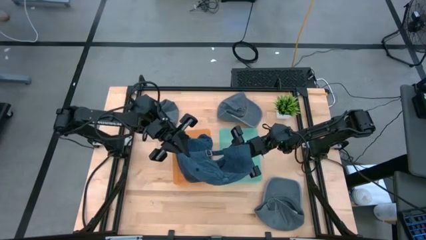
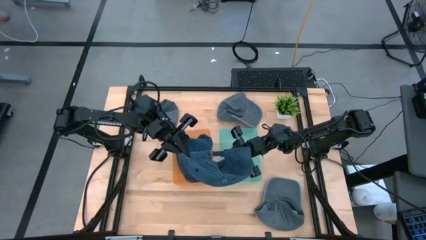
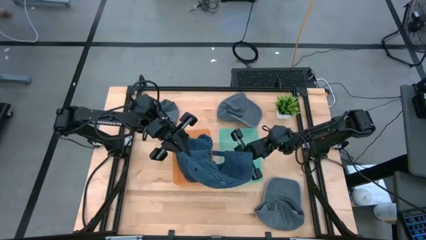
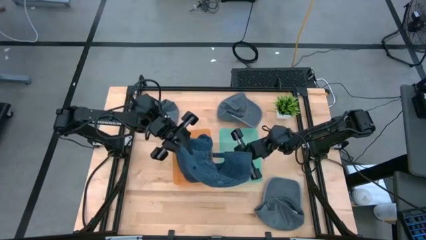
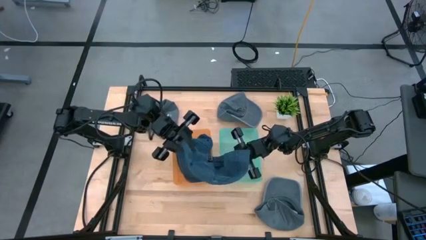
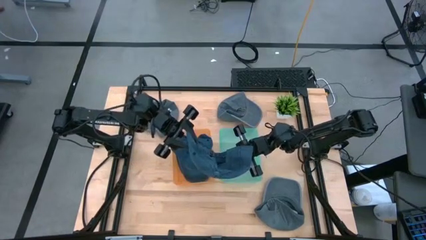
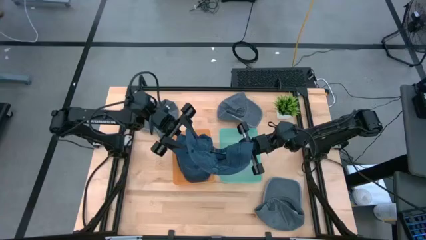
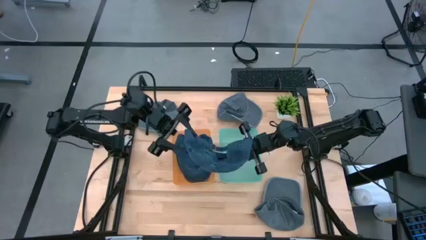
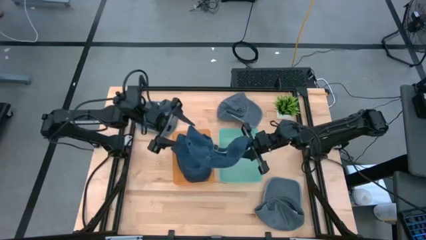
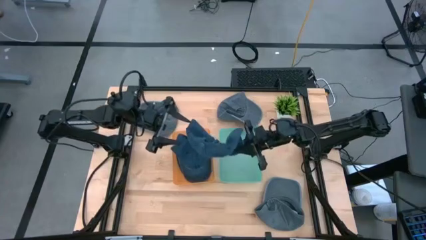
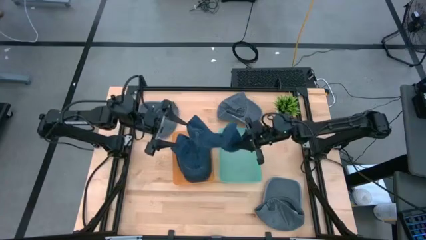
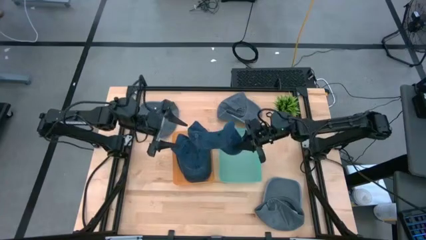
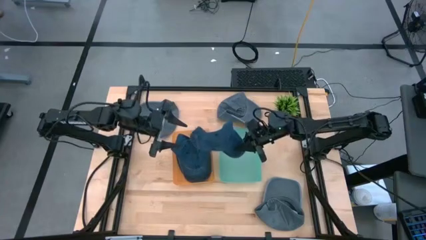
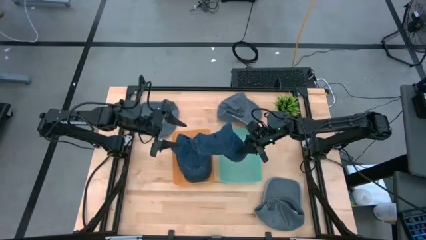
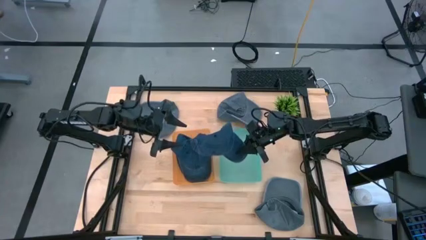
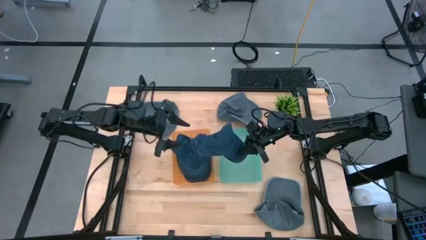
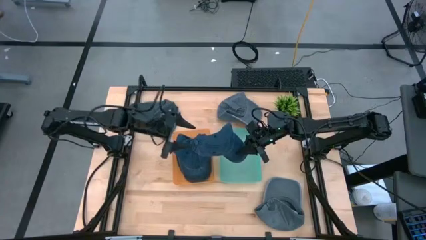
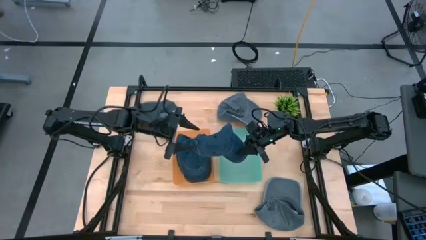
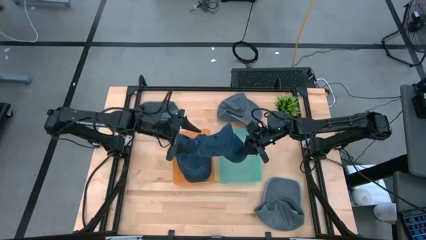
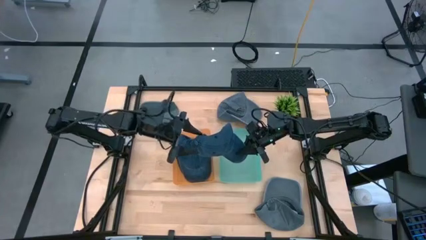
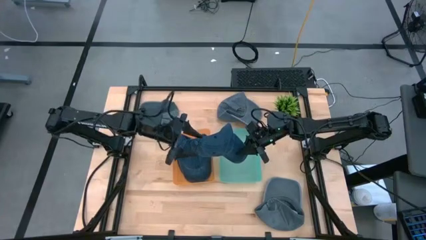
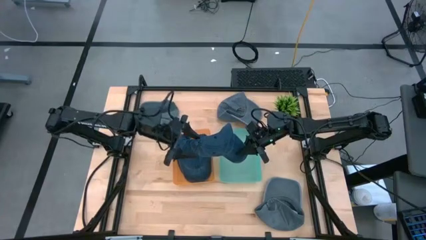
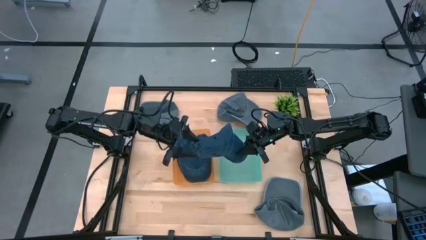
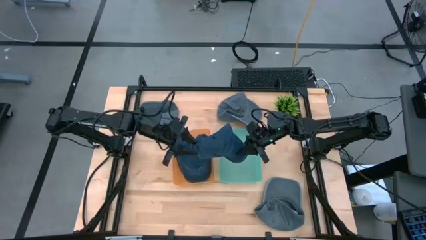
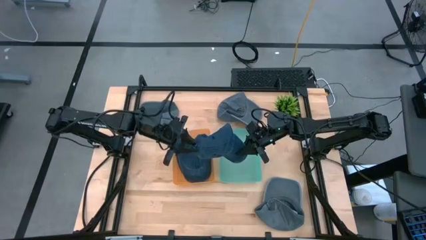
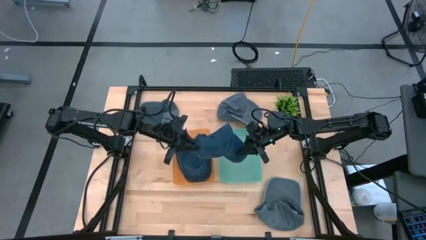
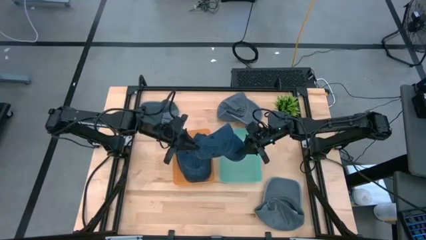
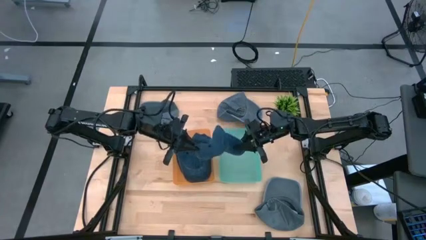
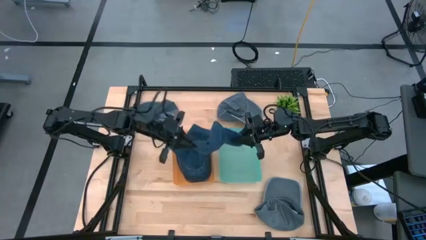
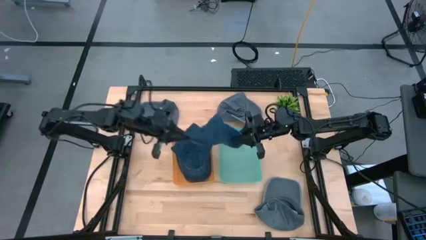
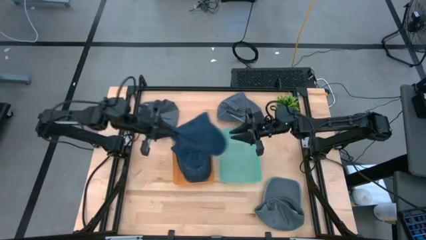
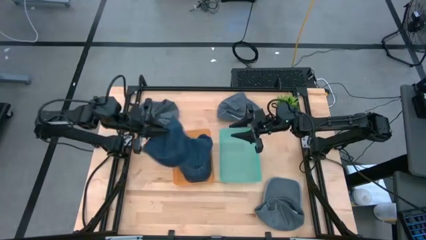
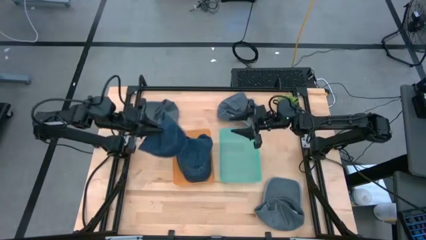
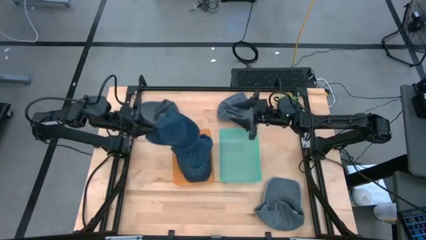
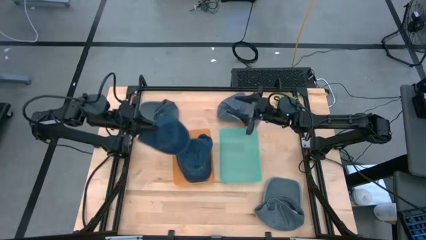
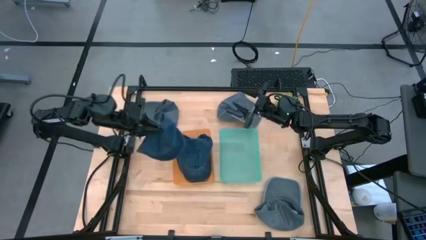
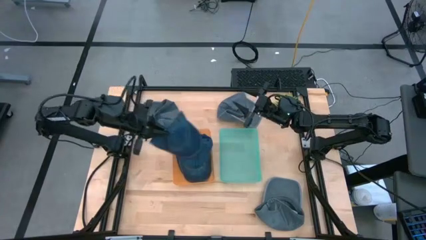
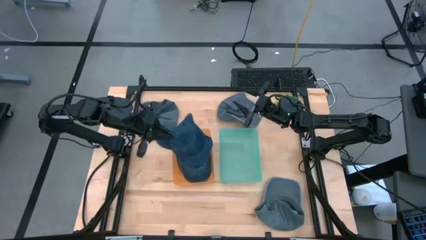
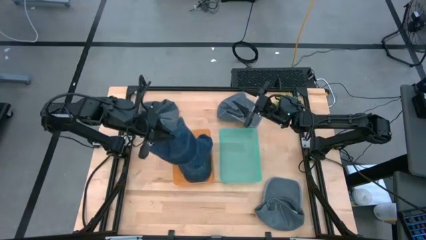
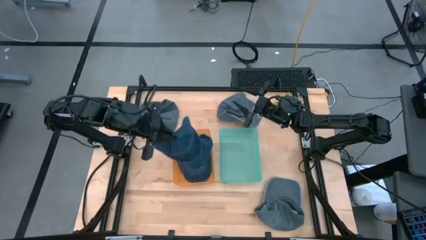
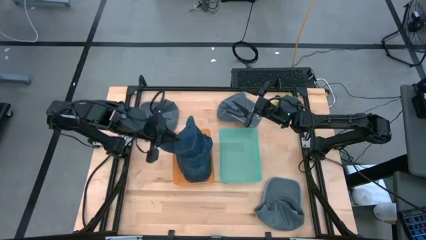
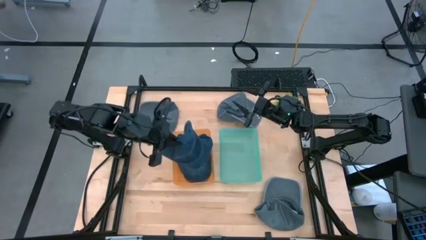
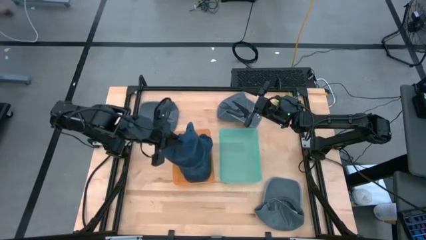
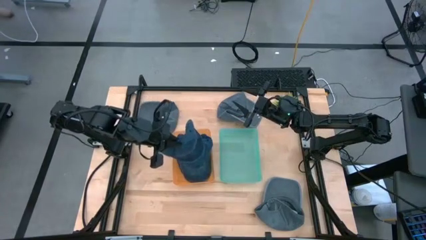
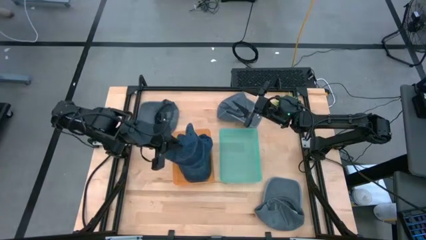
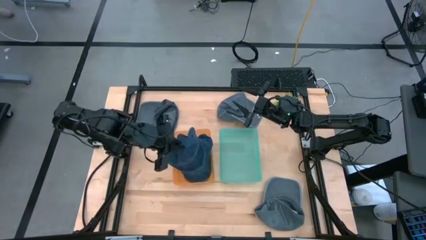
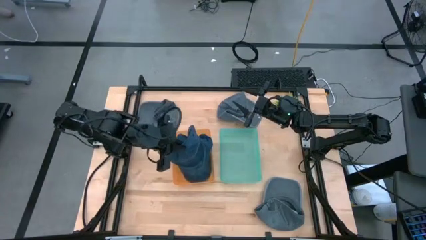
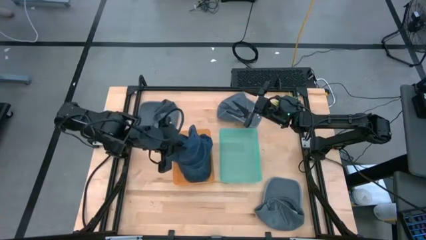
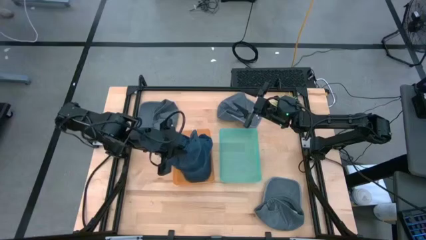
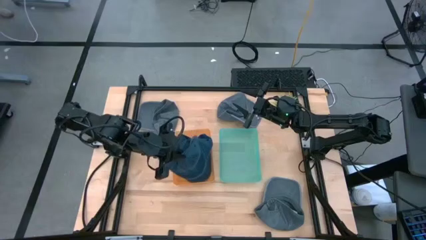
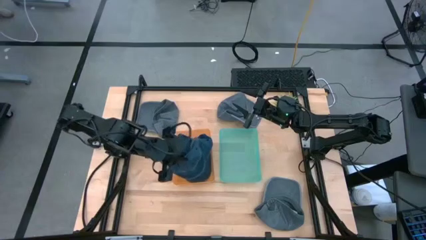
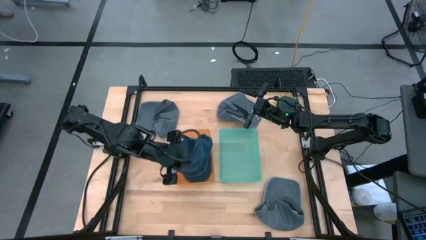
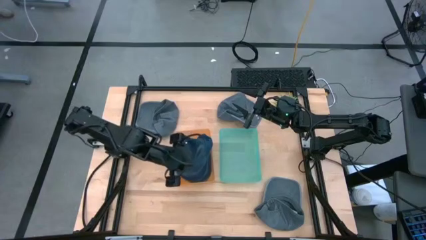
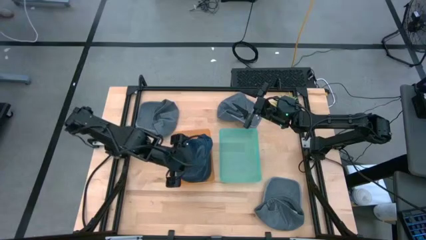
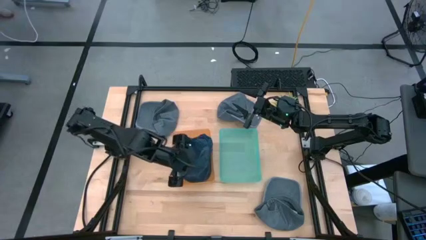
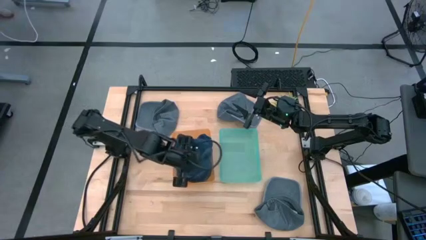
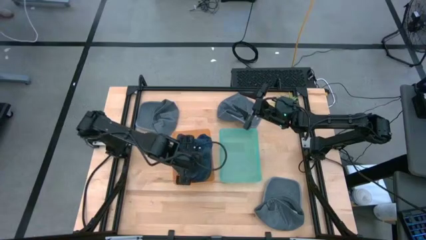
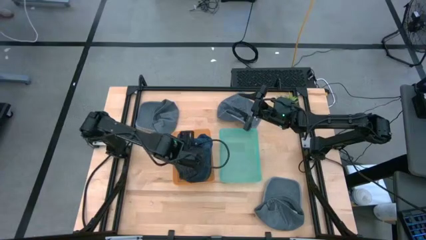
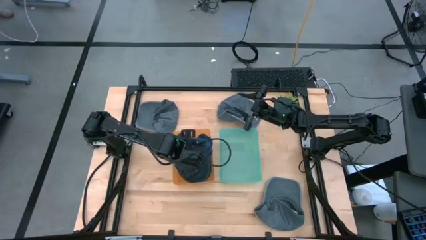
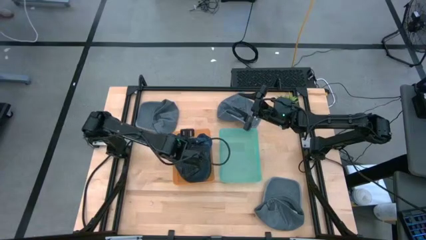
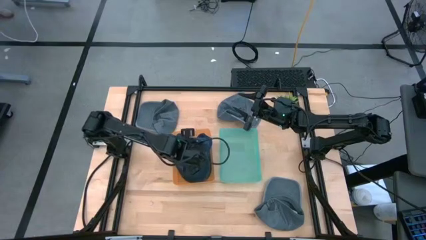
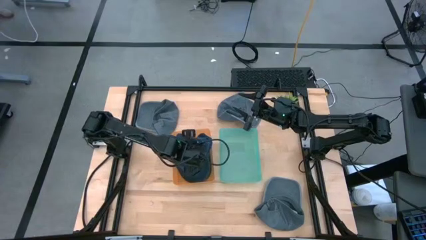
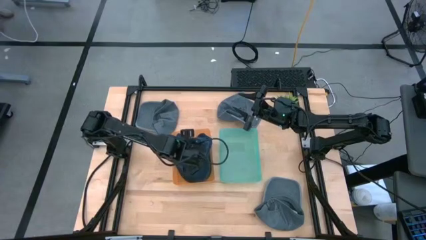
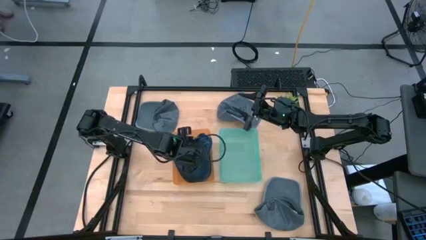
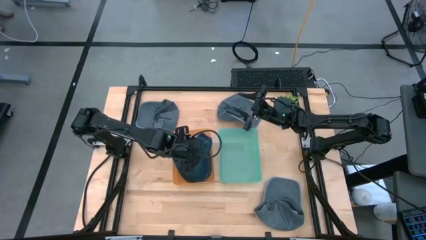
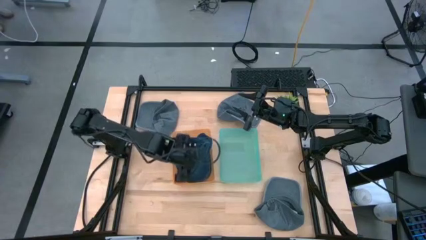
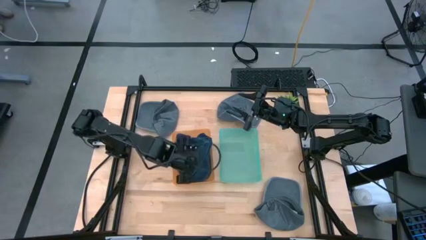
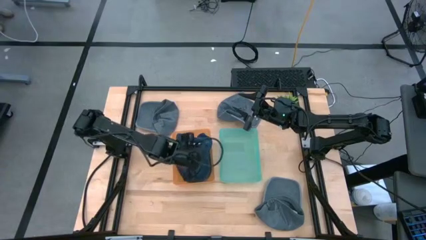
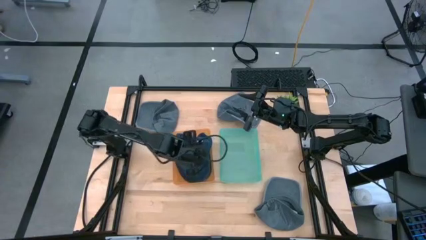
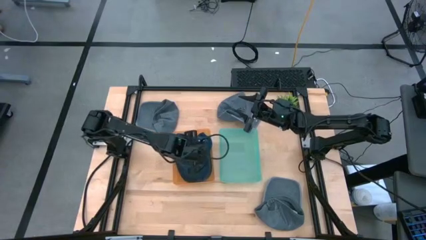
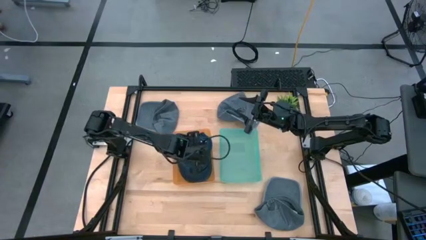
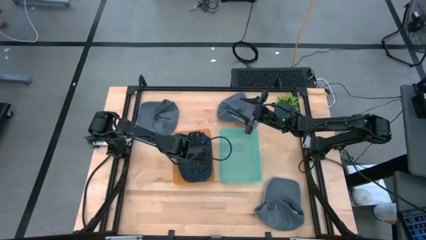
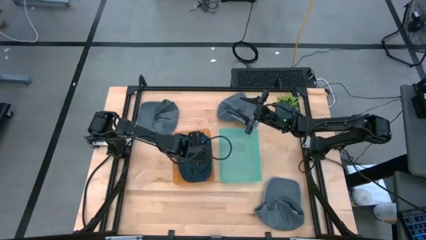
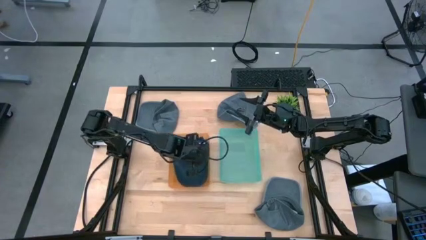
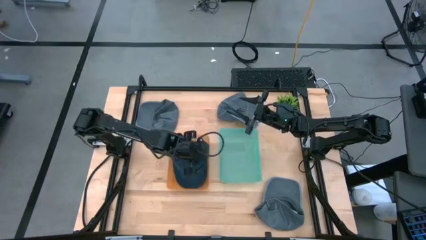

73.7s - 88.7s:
Task: Pick & Place hat
Put the blue cap into the orange bin

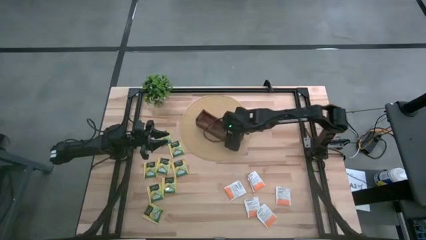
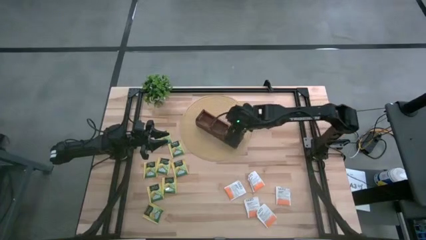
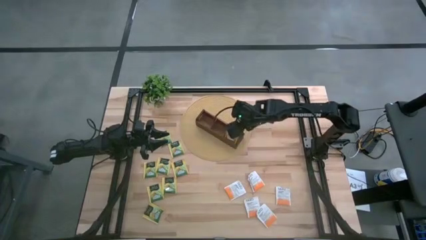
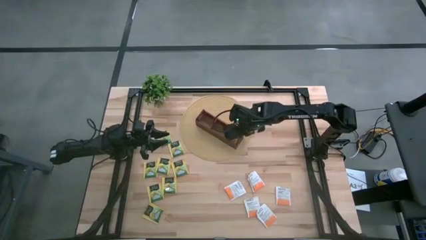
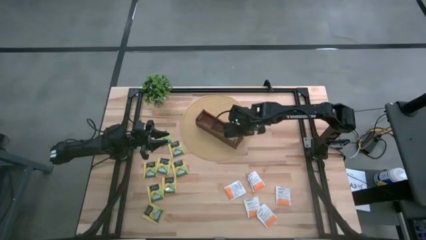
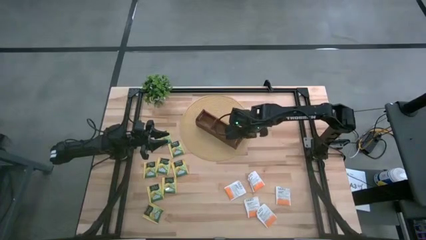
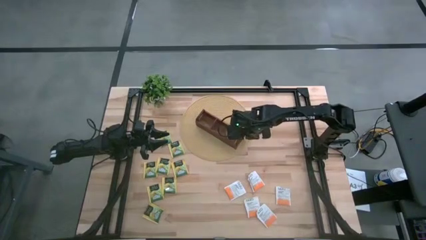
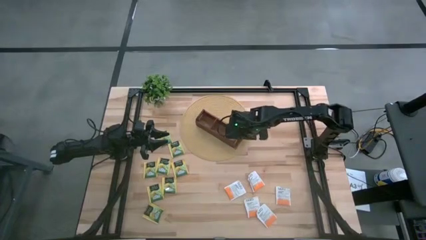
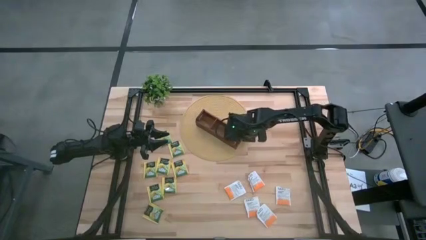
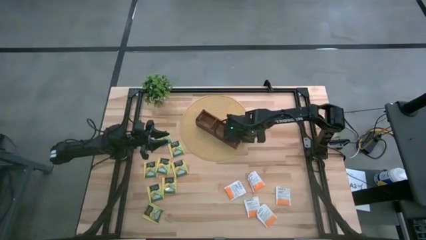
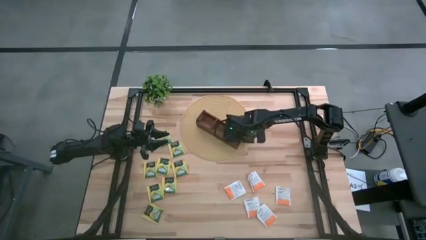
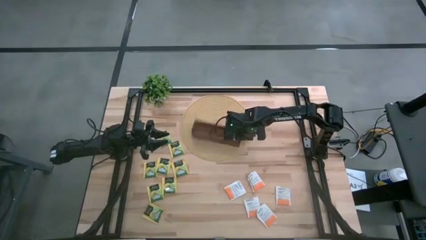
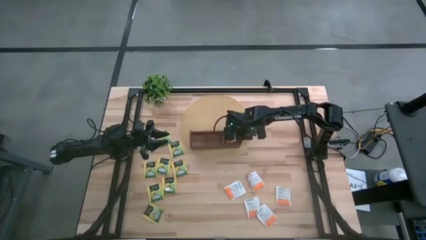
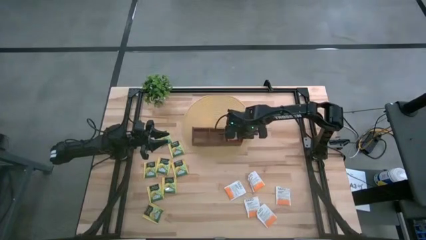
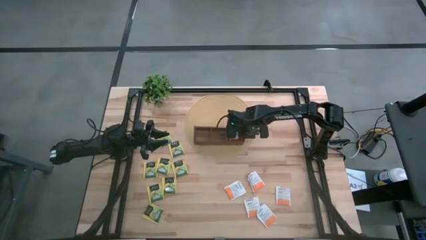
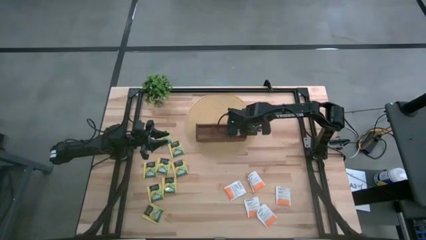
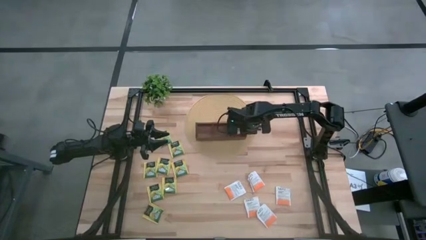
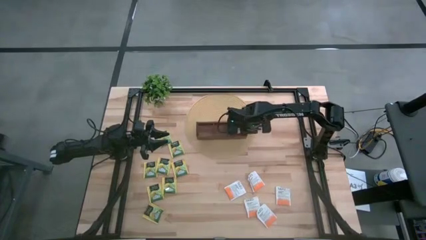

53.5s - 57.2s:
Task: Pick & Place Tea
Adjust the wooden organizer
